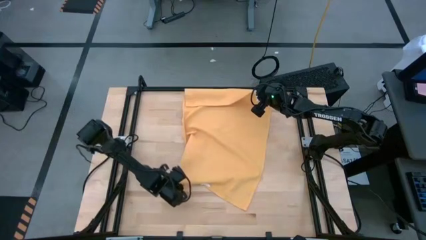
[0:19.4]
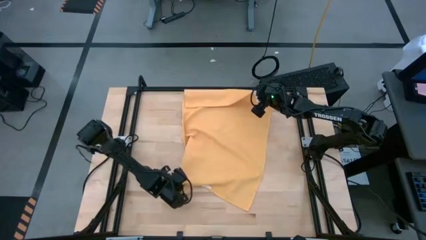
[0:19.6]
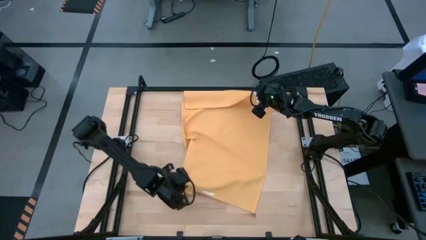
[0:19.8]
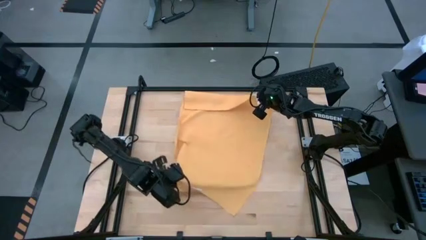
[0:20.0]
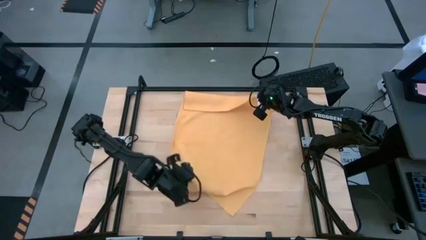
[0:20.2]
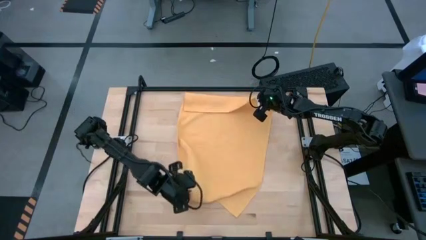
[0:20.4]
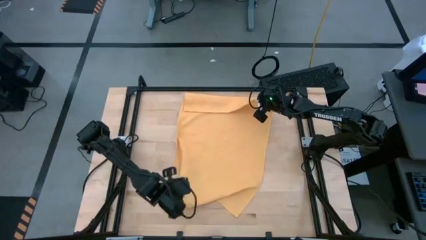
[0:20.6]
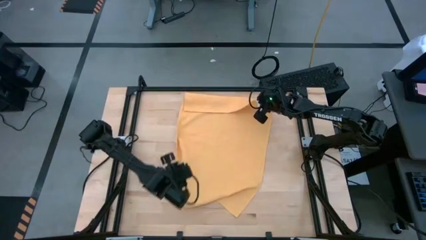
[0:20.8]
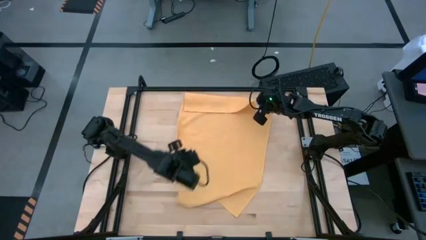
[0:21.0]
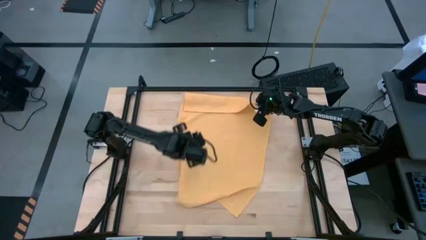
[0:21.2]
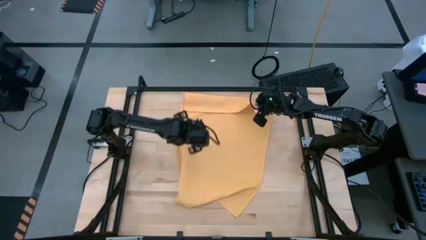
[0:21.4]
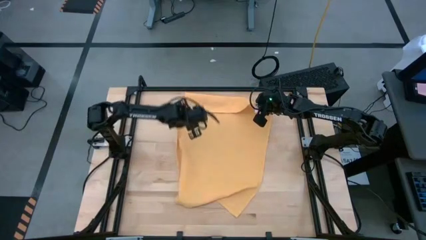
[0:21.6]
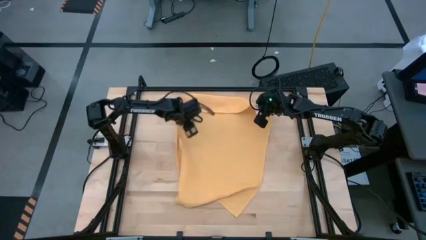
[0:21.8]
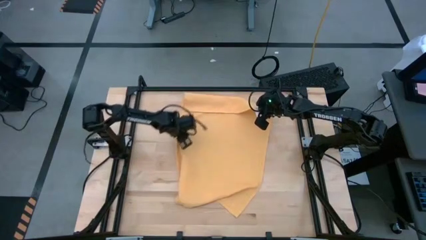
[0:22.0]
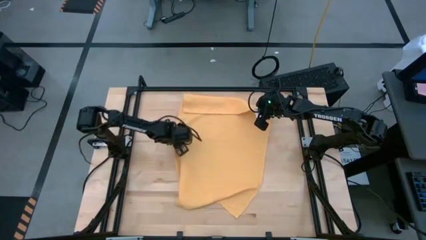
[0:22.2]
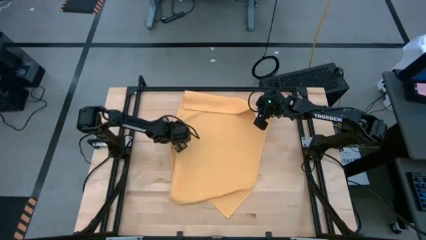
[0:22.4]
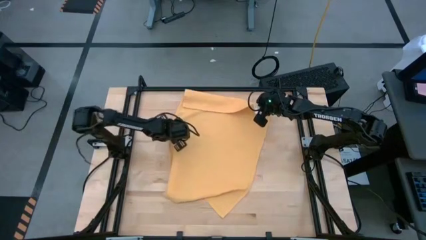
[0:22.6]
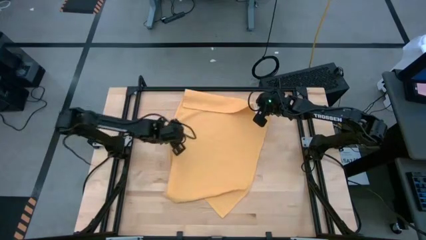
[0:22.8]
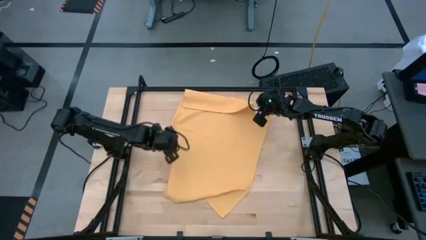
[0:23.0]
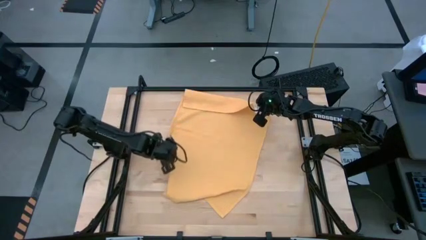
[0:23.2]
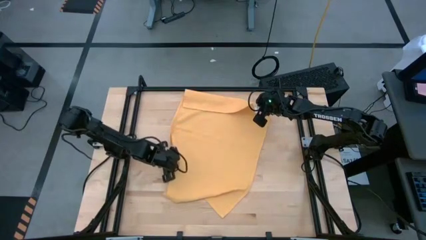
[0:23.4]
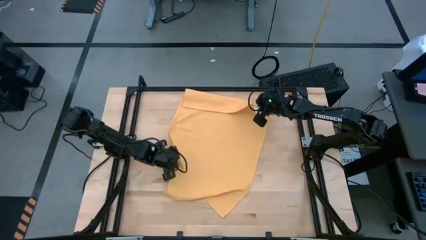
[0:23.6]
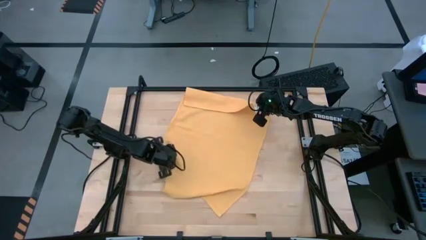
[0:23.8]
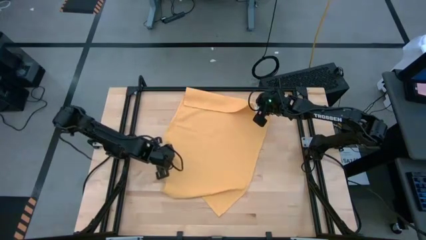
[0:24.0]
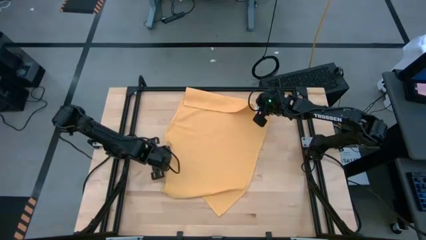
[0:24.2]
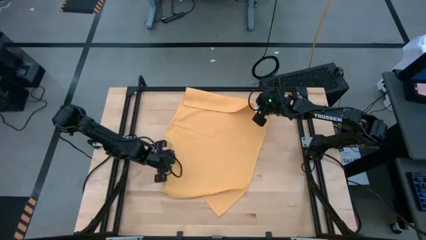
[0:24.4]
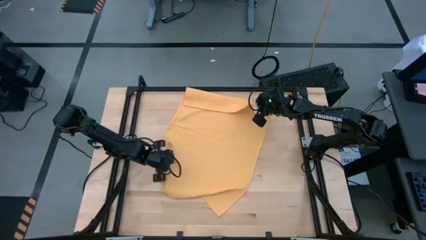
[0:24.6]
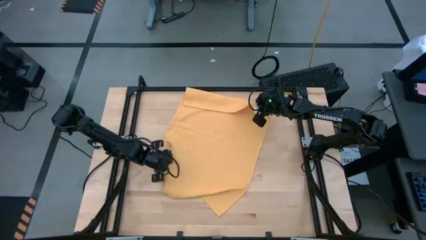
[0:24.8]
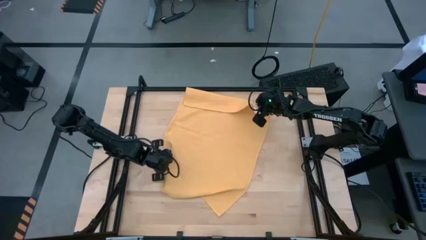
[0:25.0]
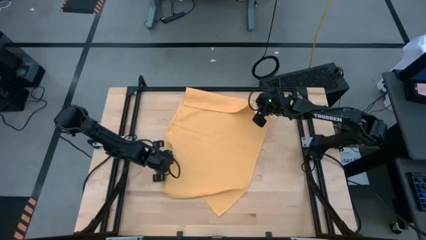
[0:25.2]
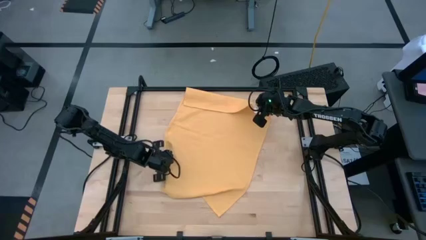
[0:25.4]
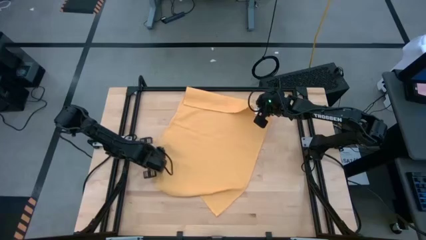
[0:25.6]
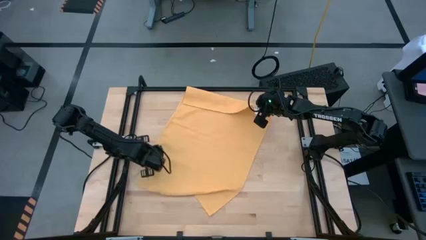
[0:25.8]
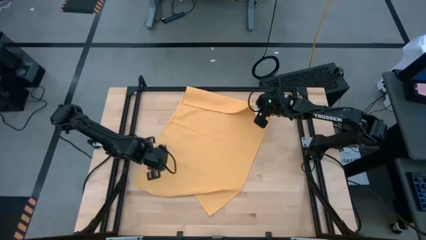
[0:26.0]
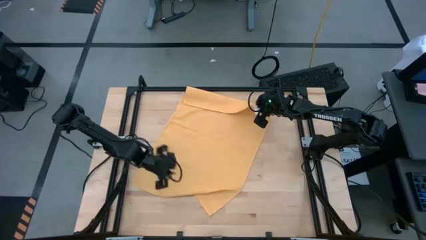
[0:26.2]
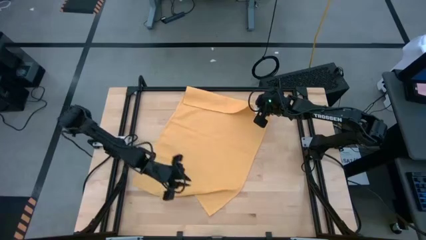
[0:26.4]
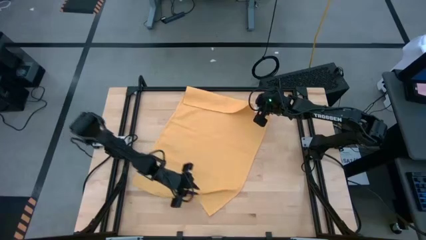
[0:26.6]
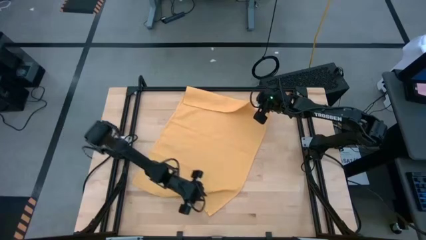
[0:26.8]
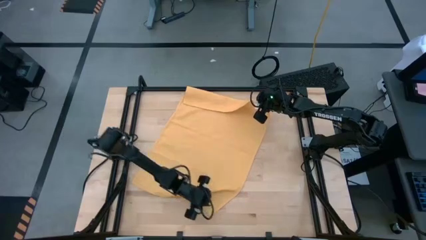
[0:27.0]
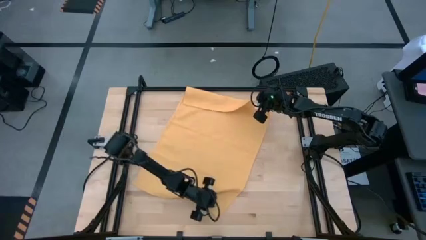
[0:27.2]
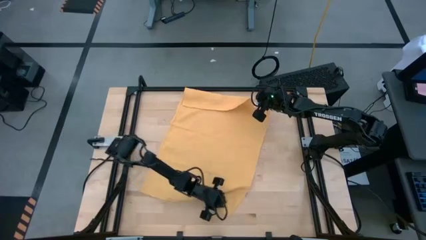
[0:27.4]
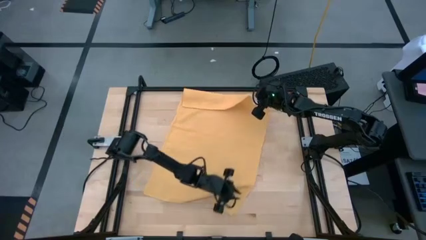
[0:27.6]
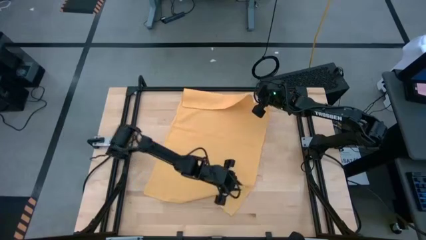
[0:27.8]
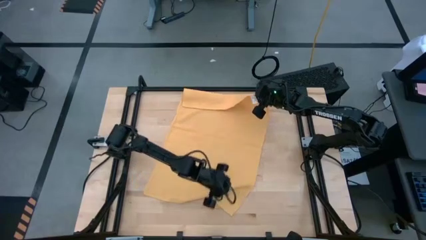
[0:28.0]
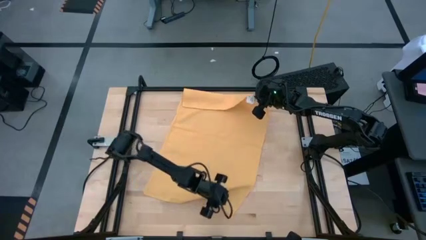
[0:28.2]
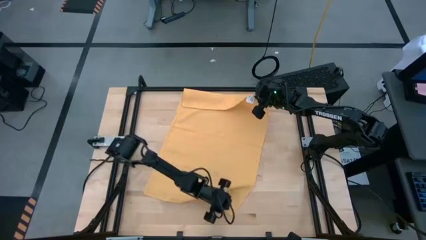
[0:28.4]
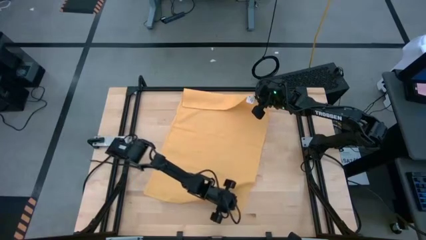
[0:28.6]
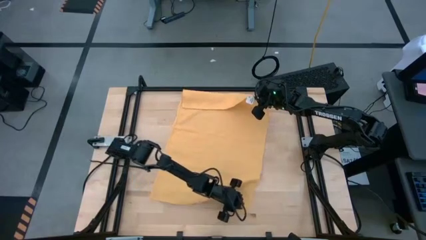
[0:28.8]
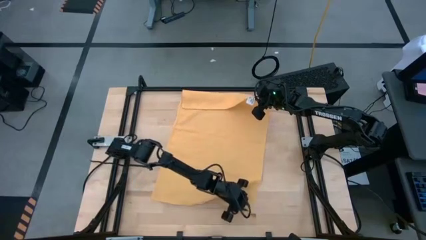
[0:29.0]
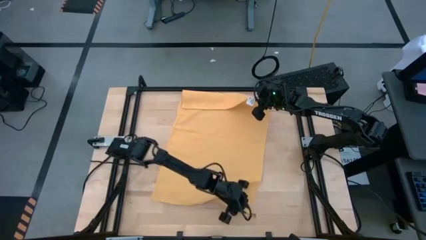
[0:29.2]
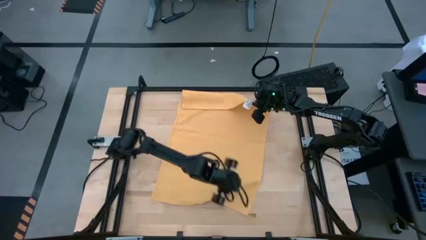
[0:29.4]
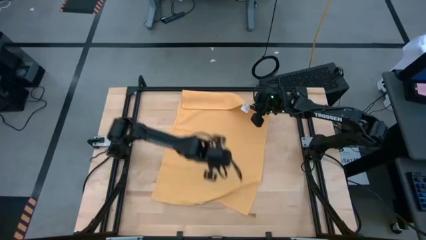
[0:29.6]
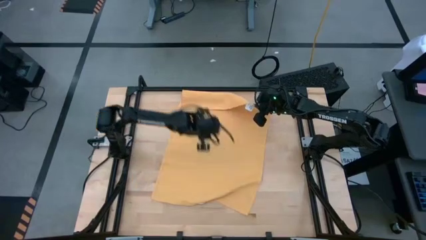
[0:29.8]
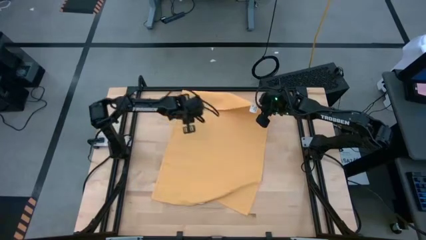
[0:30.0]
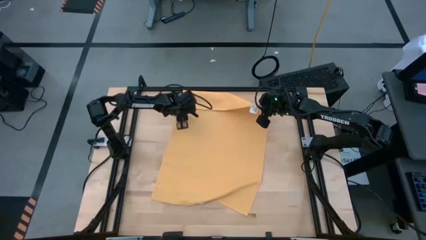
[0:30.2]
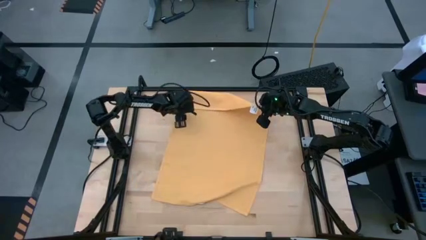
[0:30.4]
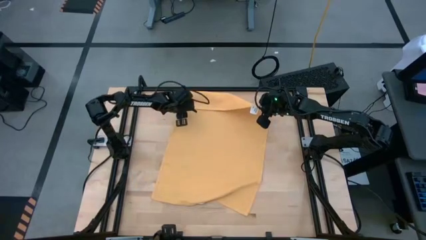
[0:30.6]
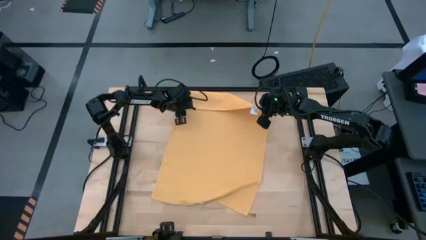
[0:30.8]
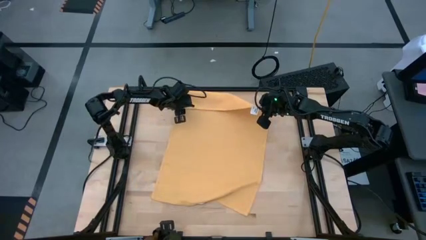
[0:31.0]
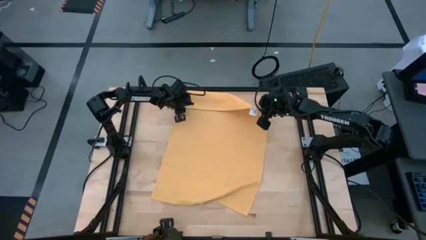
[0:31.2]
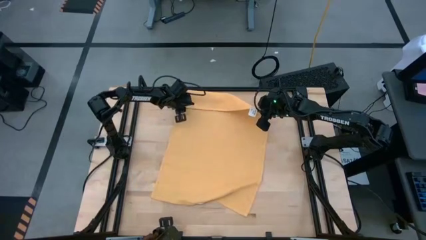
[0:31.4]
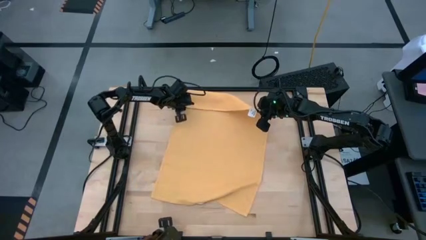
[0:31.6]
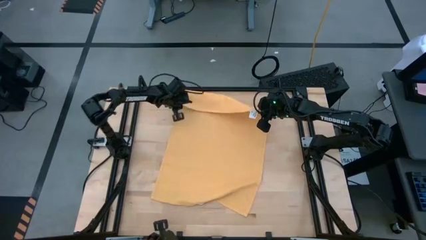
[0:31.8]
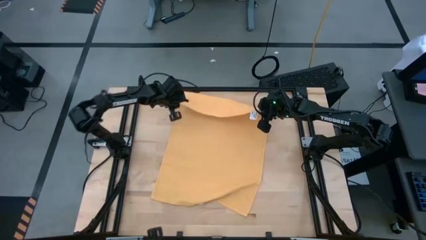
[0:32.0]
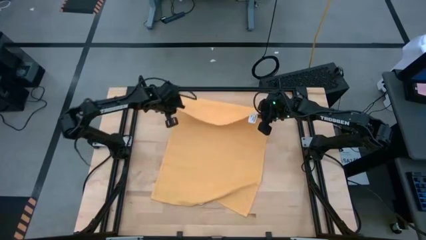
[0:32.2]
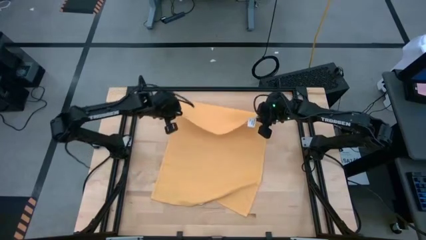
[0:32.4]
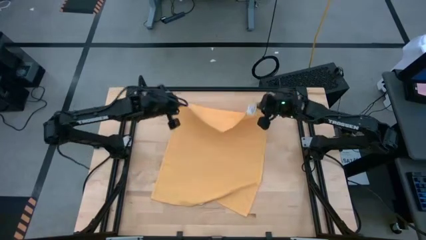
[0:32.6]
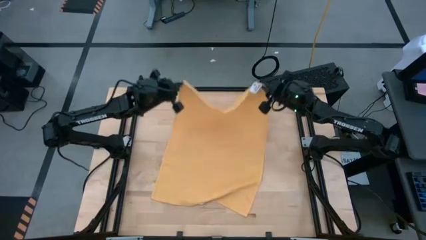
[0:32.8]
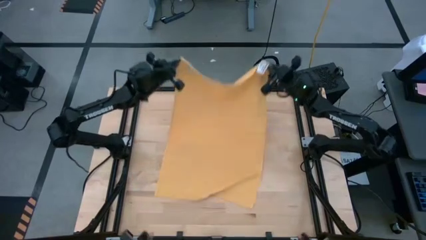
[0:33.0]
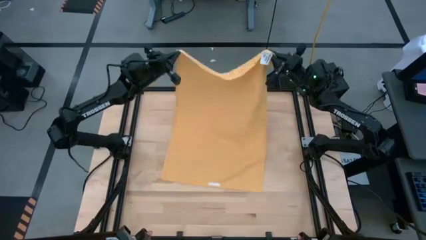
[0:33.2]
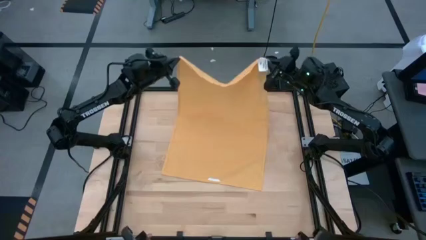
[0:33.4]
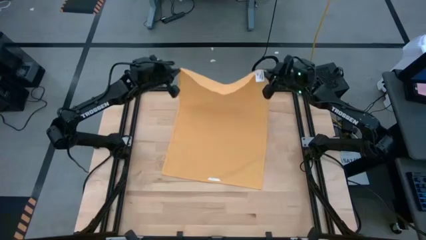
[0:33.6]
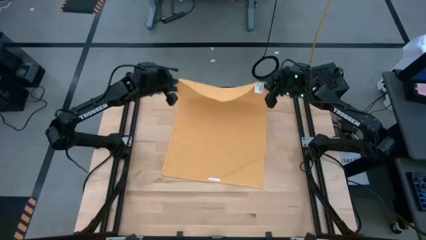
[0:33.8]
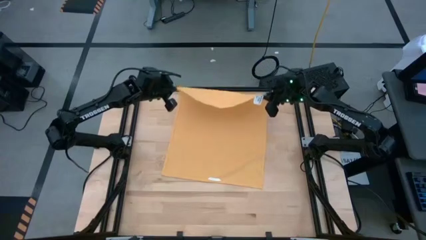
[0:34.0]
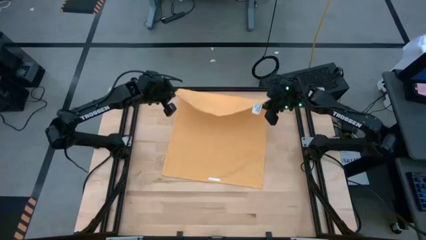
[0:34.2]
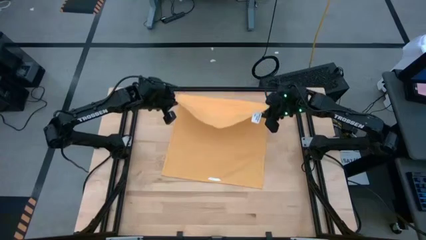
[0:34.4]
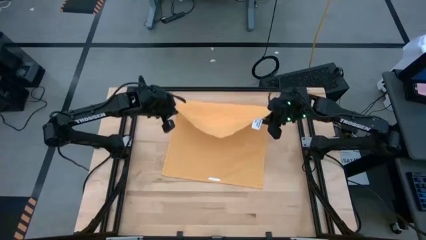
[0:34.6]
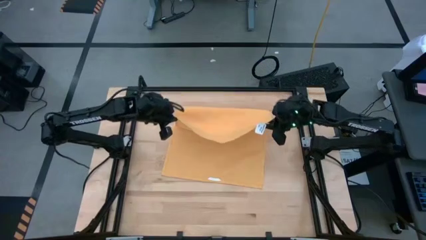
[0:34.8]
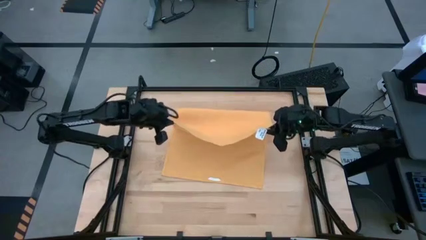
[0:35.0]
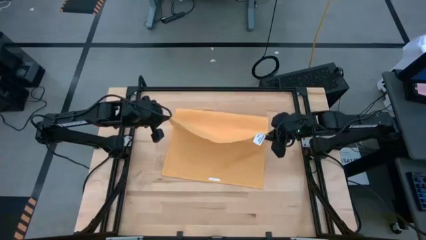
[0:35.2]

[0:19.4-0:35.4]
Task: Roll towel
Fold the yellow towel
